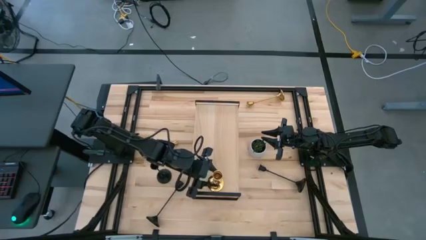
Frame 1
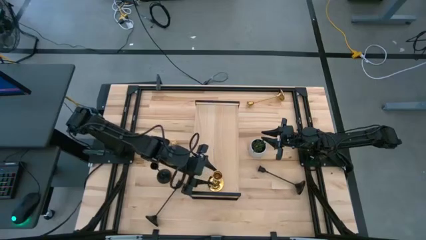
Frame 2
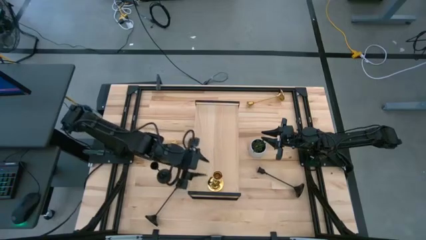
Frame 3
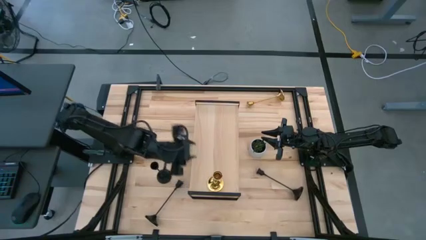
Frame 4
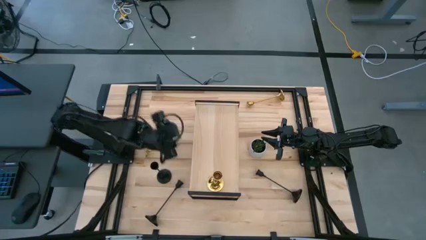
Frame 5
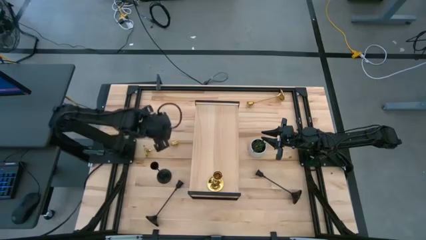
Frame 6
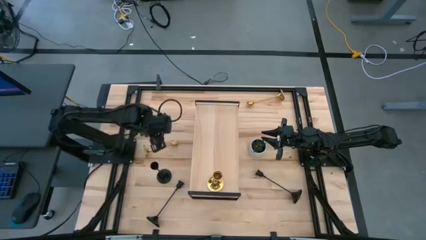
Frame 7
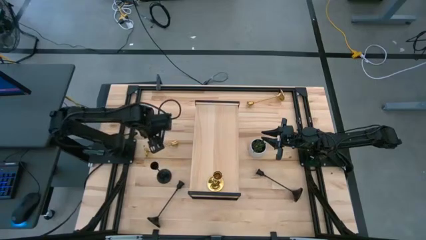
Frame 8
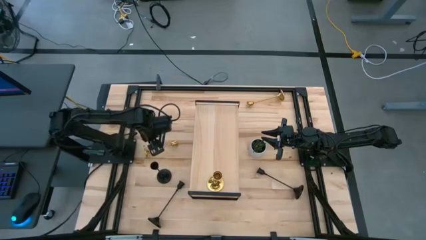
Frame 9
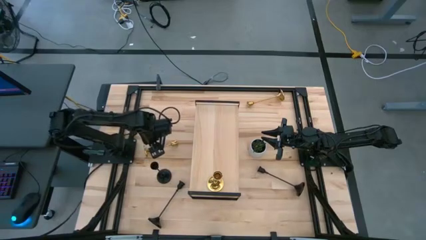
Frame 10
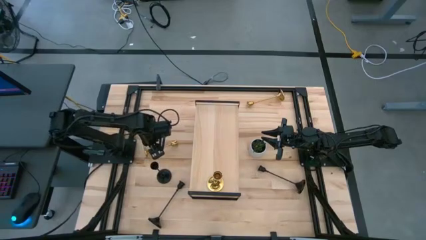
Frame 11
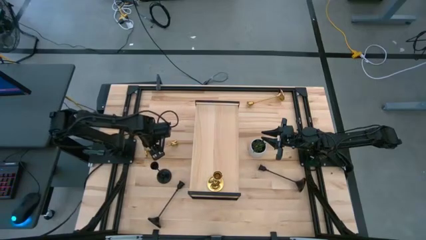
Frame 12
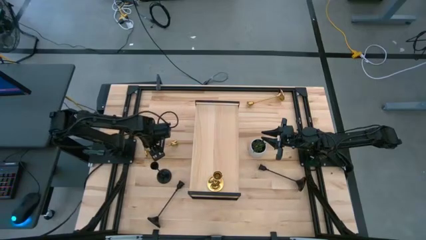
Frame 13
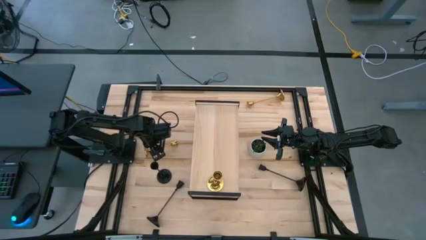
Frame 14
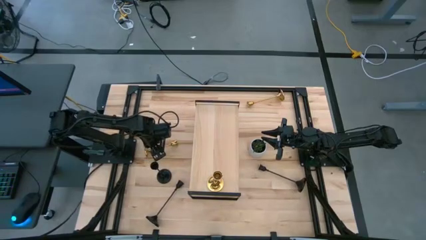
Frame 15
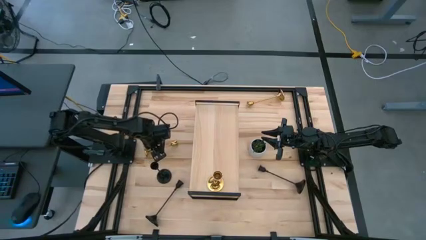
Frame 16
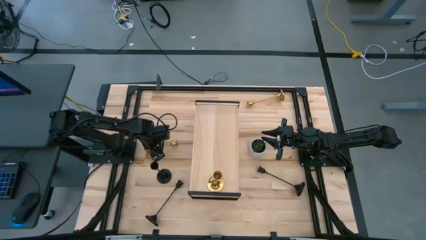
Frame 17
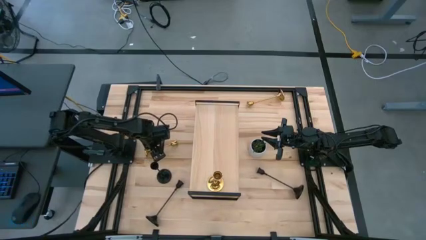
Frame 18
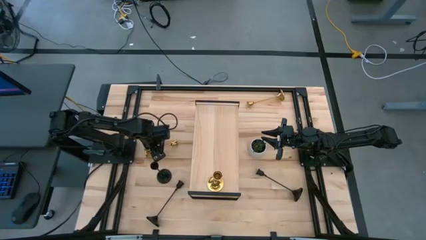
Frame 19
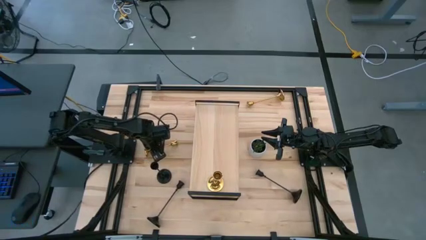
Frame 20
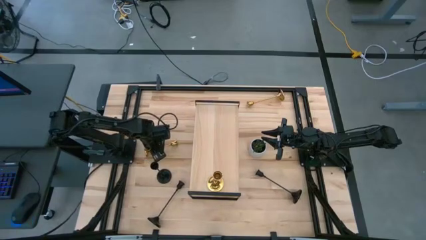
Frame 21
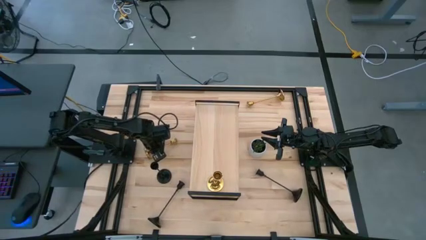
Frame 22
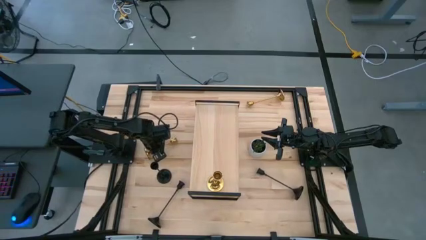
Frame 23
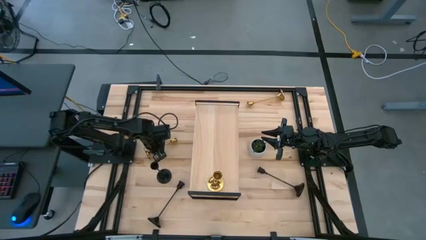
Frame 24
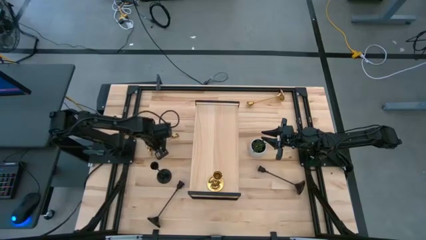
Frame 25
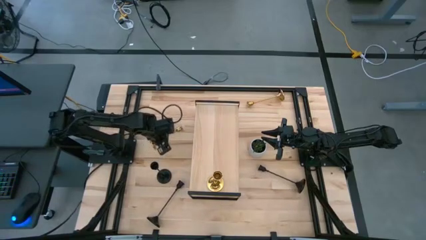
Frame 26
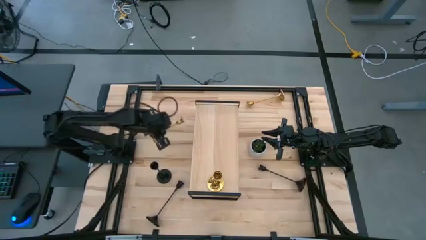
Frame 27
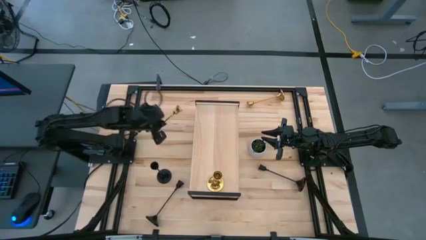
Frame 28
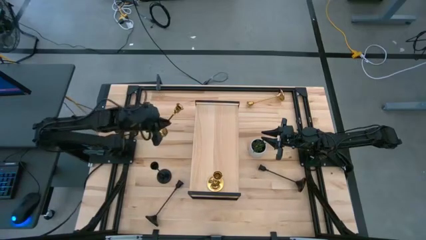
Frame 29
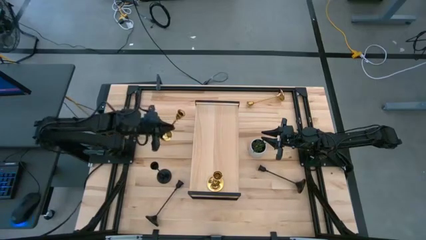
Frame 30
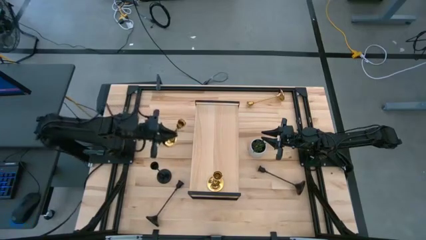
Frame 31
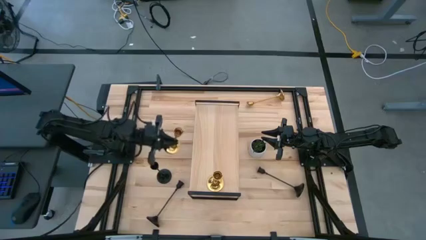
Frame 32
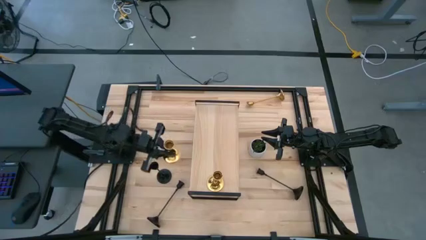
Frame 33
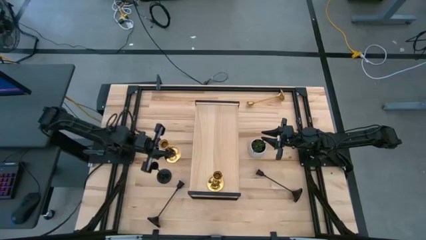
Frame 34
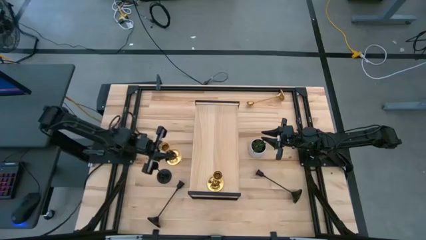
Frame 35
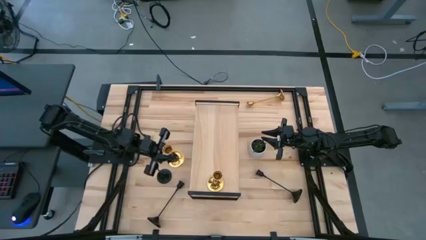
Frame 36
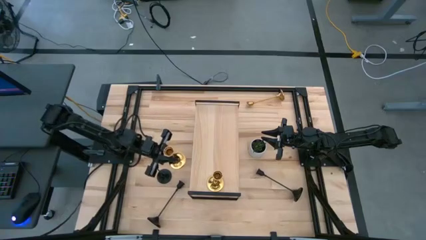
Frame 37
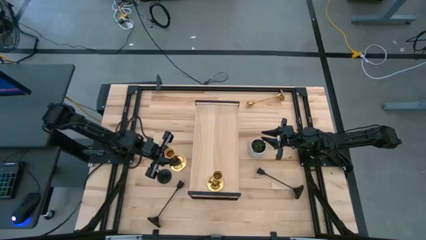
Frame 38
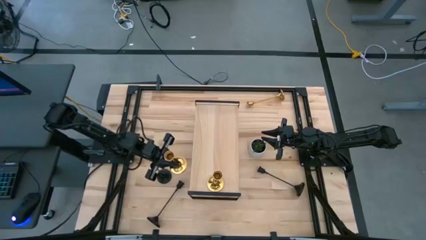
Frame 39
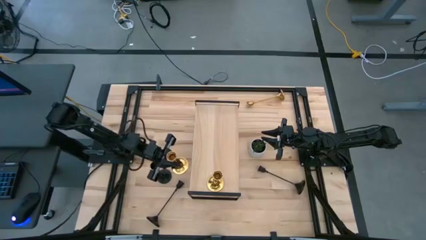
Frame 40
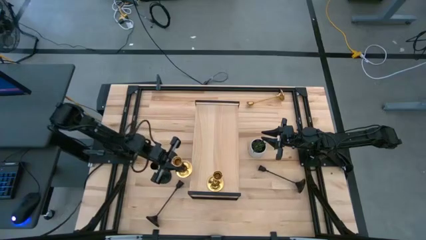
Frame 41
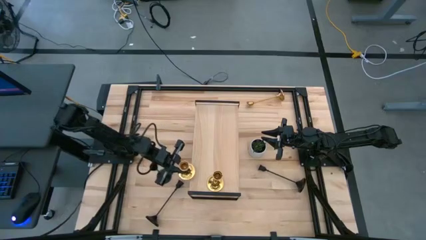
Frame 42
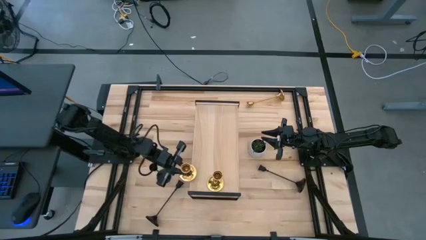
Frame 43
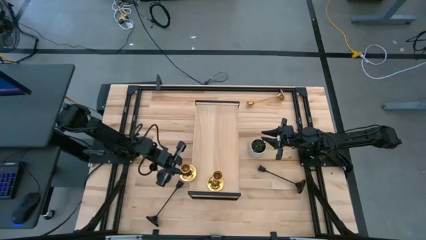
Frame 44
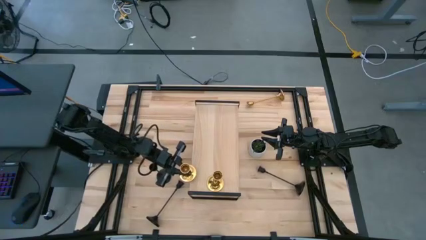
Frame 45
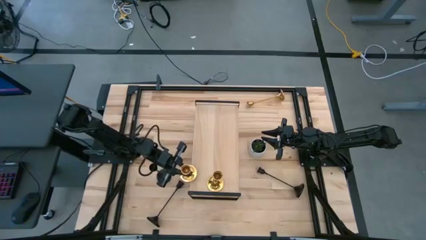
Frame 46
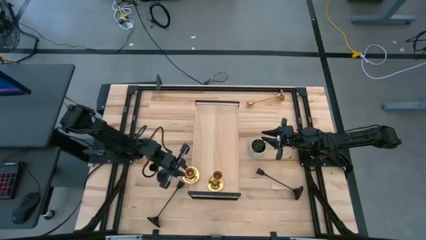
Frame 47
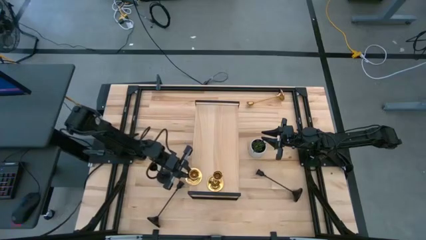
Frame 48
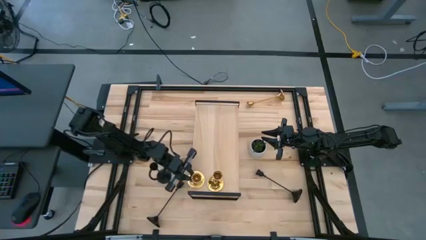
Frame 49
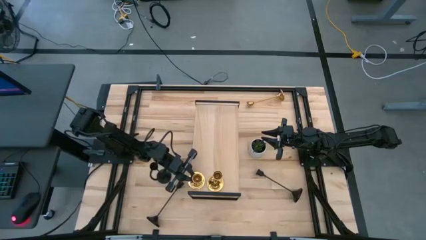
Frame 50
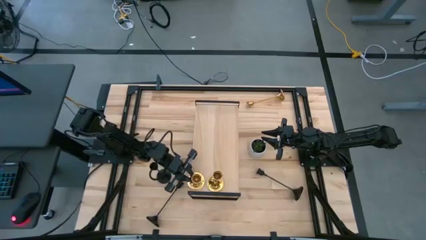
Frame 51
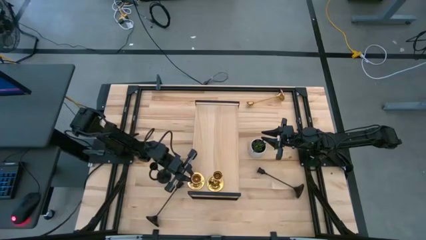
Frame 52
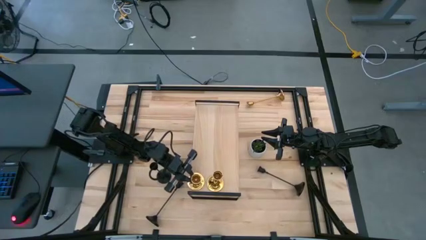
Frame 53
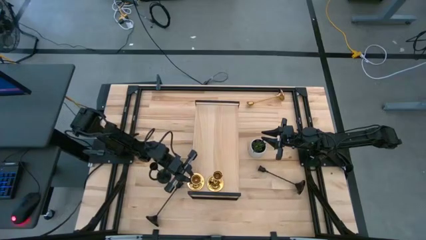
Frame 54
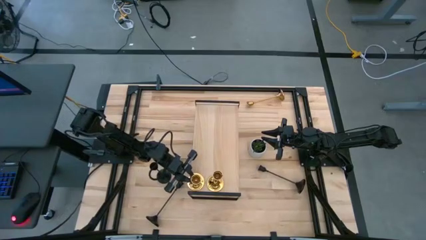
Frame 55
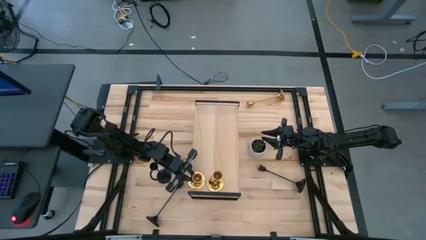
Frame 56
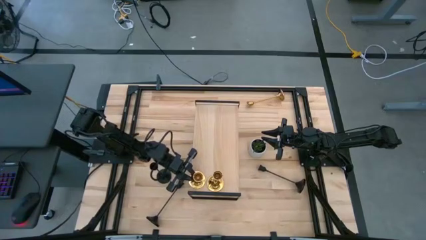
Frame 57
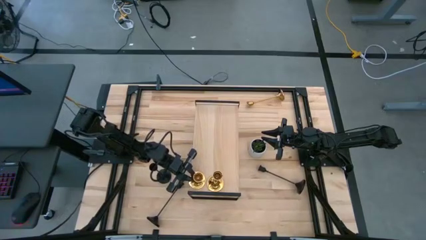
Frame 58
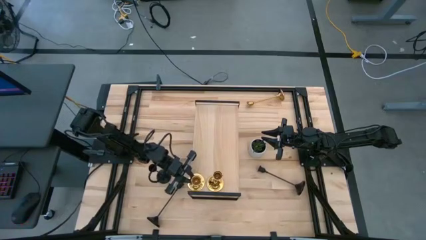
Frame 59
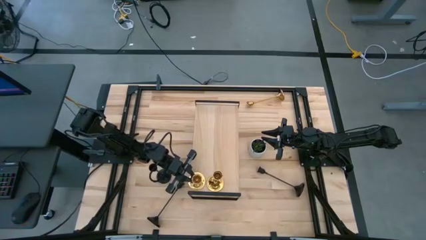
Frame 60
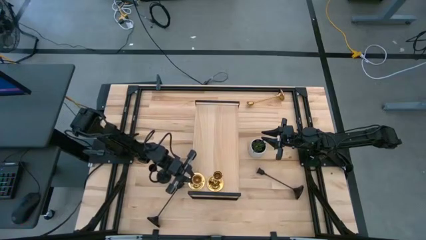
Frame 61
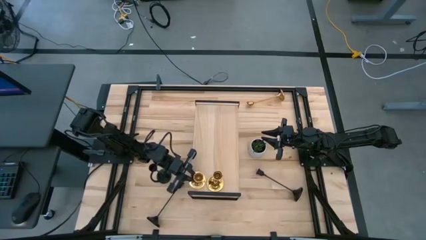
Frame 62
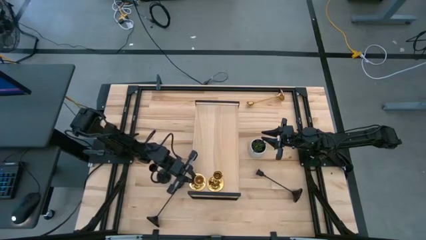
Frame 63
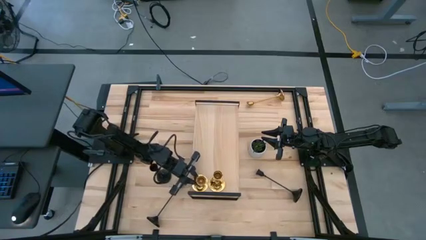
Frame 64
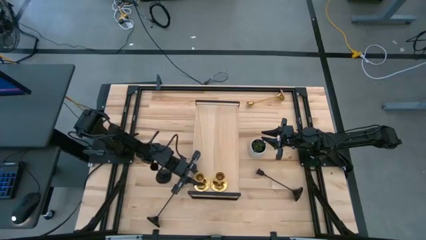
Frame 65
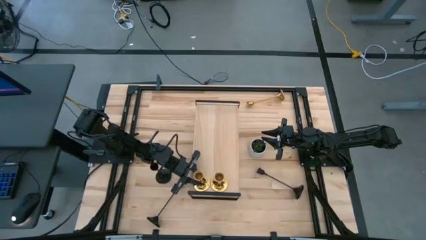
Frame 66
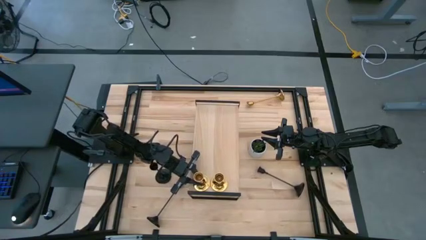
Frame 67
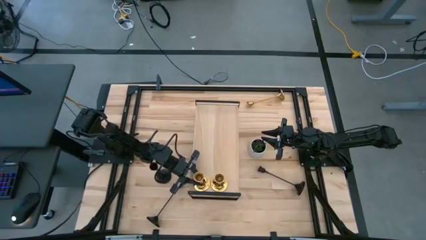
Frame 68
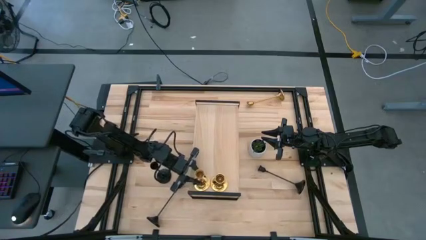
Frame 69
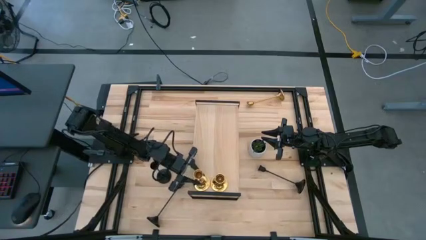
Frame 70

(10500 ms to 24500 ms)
Task: Pick & Place candle stick holders
Put the left gold candle holder on the shelf aligned with the other gold candle holder

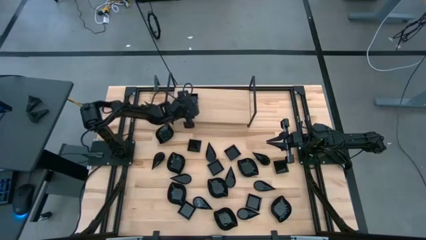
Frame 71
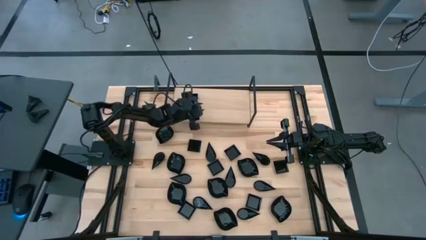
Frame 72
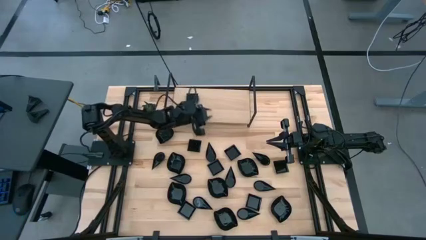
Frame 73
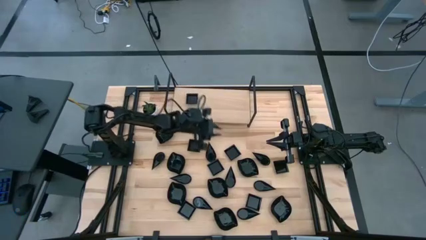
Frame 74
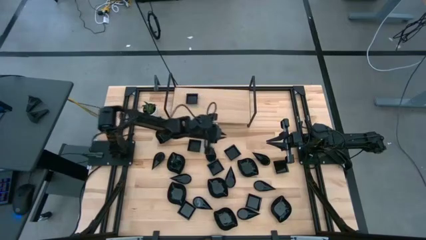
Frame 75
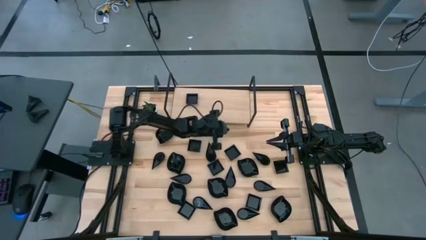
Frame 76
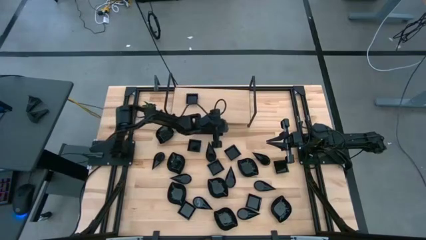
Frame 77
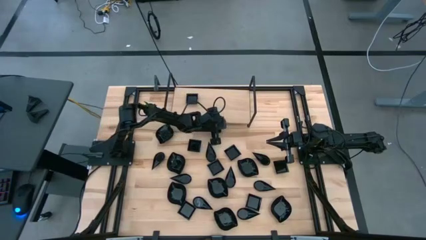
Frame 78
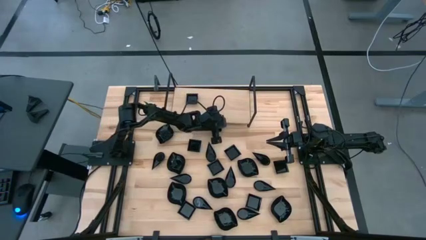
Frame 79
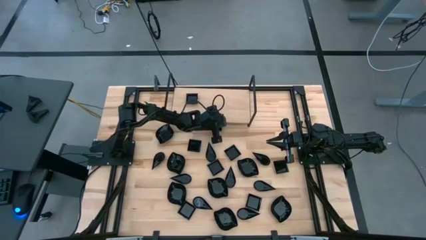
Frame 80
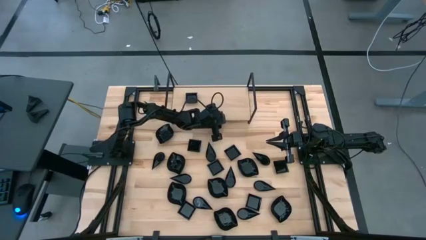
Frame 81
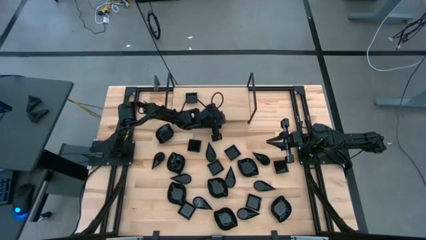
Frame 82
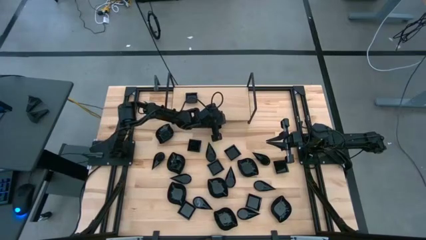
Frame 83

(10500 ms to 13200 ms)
Task: Pick & Place Mini shaped plates
Adjust the shelf
